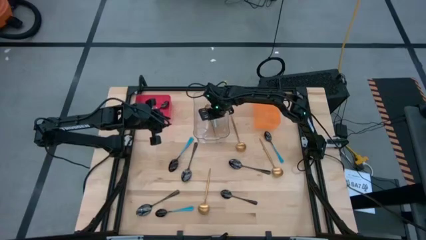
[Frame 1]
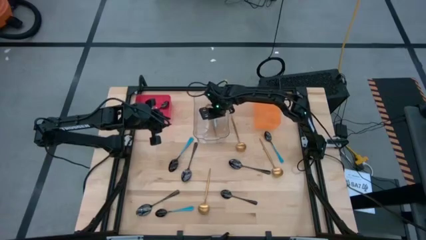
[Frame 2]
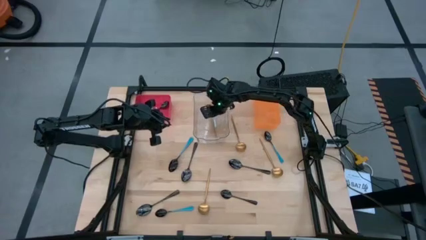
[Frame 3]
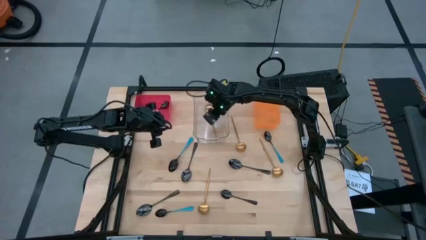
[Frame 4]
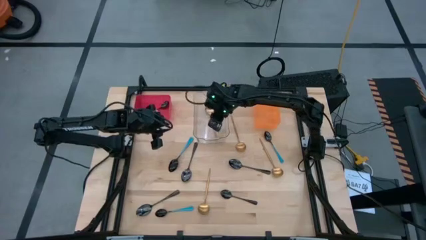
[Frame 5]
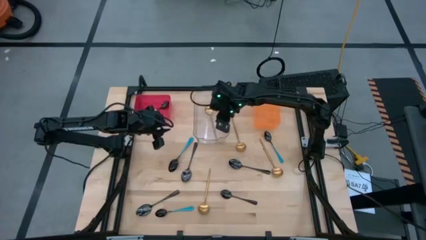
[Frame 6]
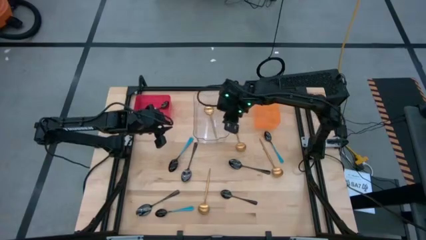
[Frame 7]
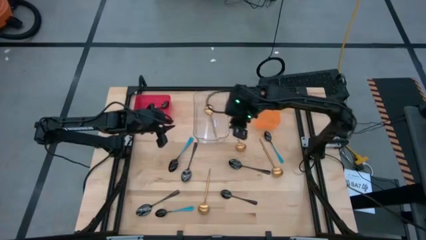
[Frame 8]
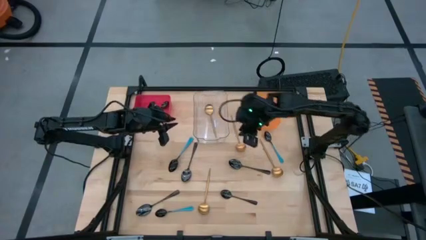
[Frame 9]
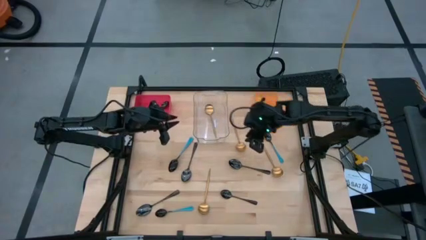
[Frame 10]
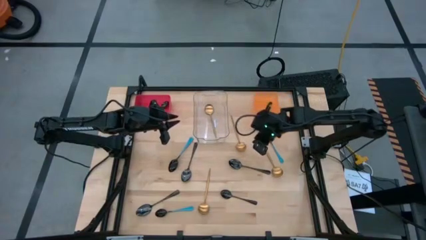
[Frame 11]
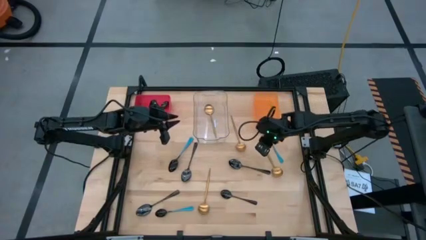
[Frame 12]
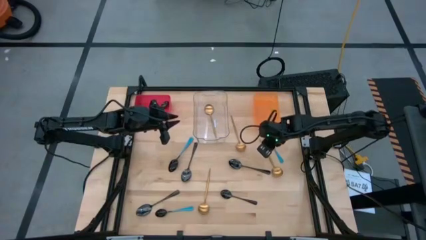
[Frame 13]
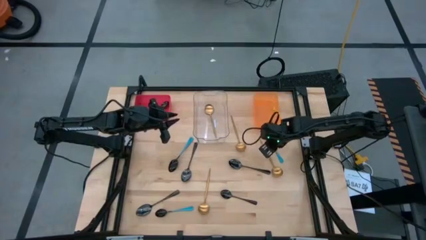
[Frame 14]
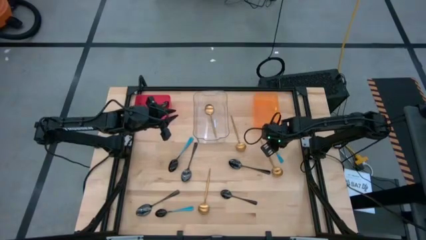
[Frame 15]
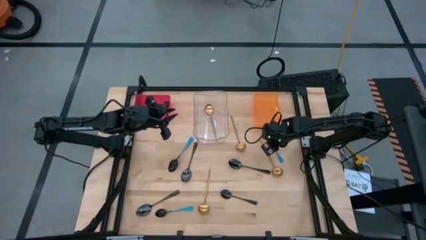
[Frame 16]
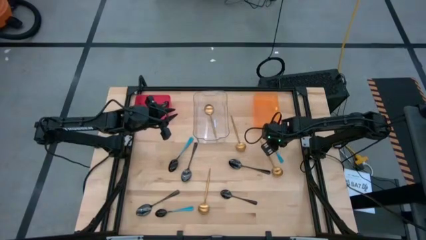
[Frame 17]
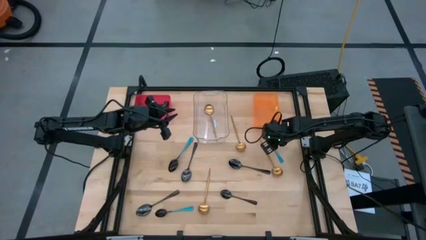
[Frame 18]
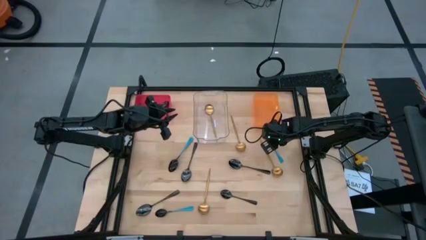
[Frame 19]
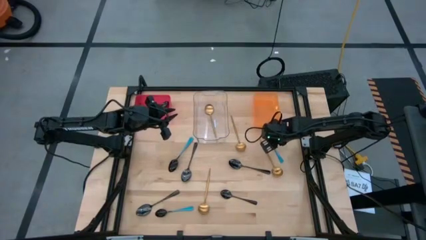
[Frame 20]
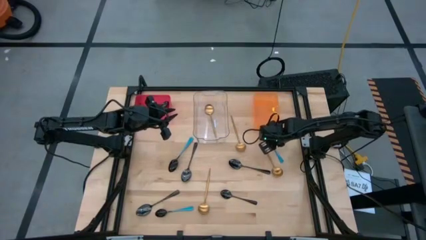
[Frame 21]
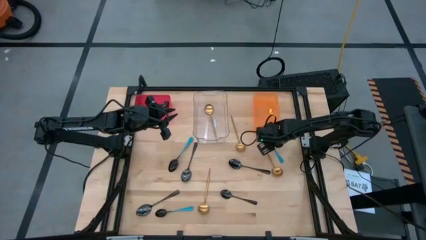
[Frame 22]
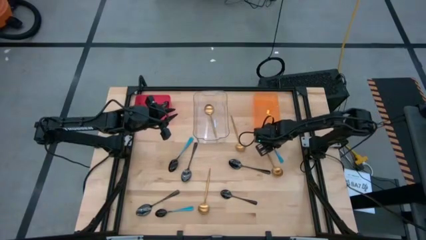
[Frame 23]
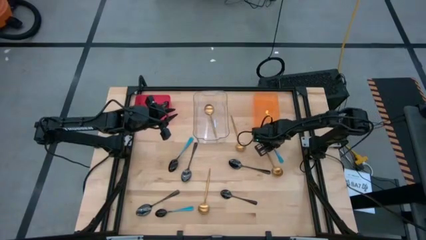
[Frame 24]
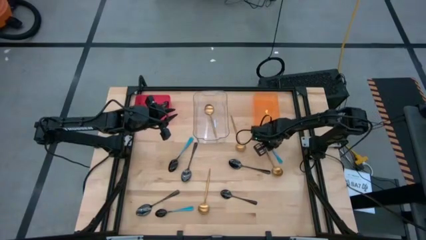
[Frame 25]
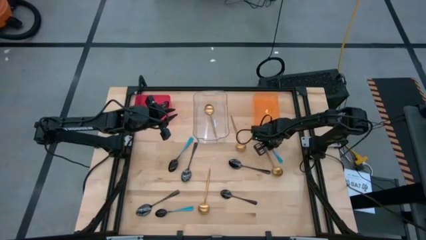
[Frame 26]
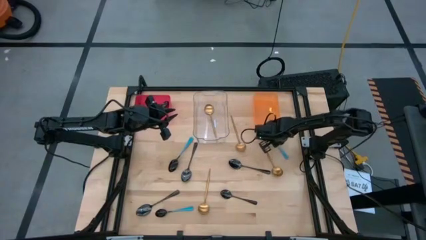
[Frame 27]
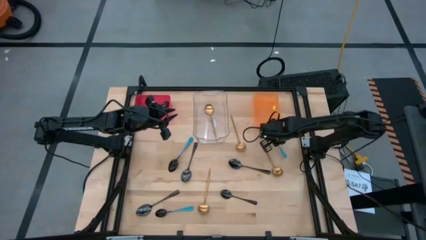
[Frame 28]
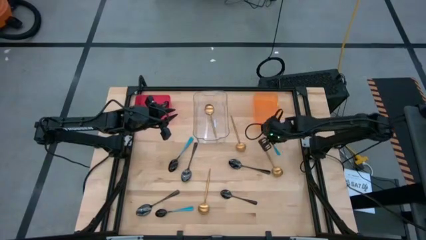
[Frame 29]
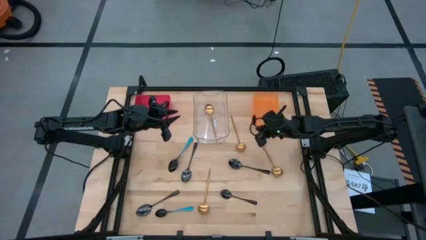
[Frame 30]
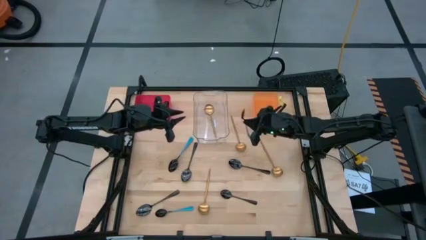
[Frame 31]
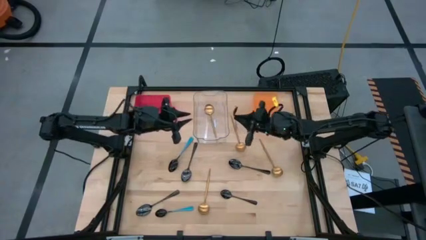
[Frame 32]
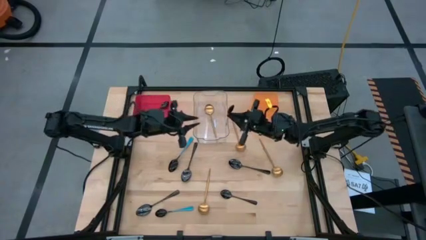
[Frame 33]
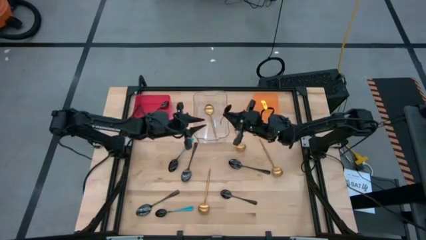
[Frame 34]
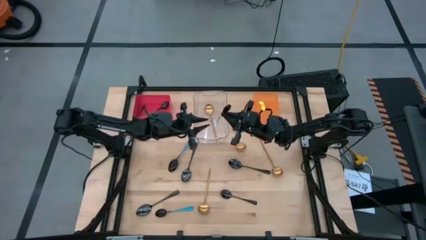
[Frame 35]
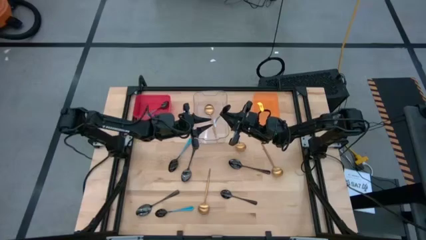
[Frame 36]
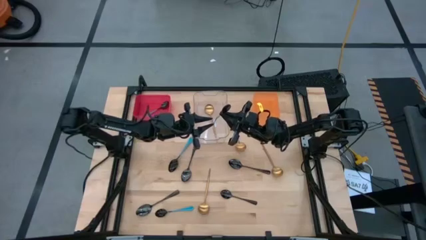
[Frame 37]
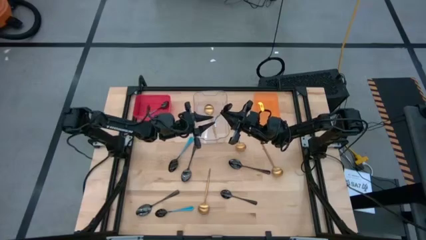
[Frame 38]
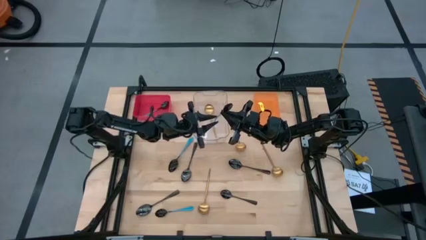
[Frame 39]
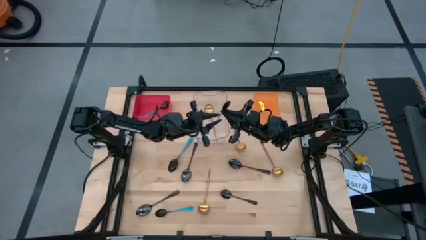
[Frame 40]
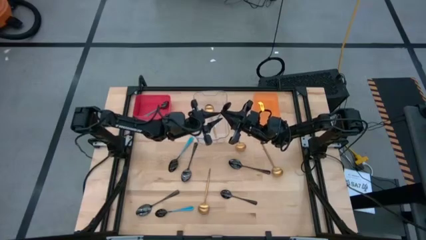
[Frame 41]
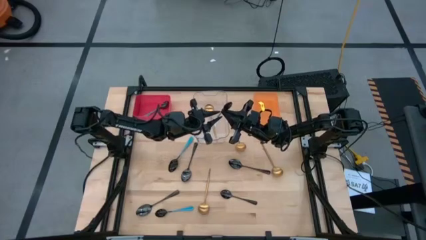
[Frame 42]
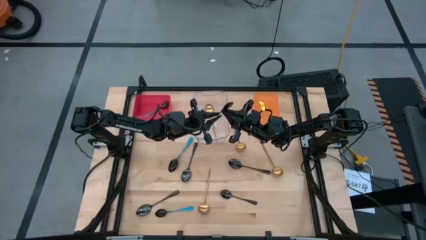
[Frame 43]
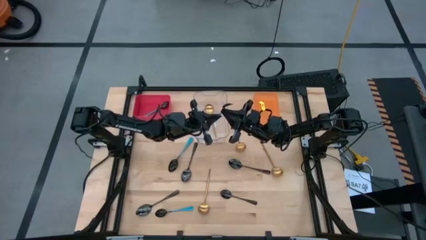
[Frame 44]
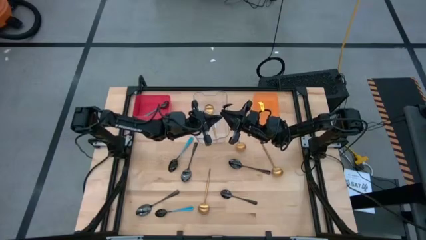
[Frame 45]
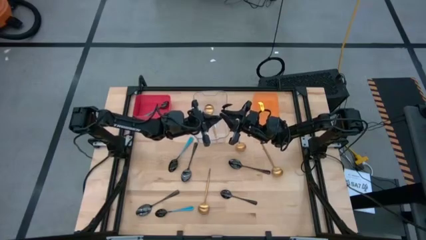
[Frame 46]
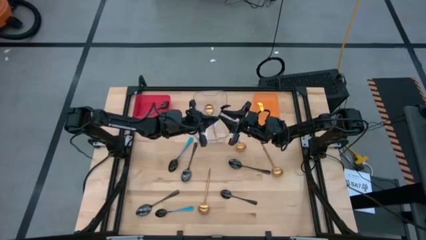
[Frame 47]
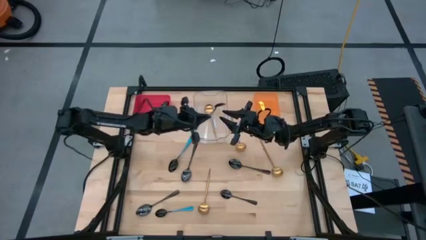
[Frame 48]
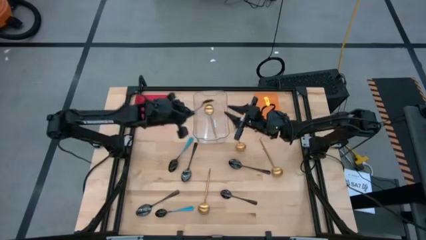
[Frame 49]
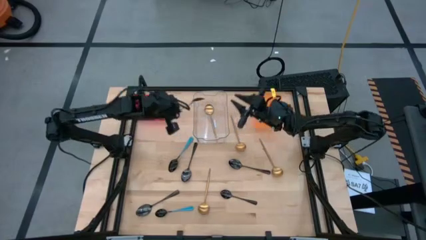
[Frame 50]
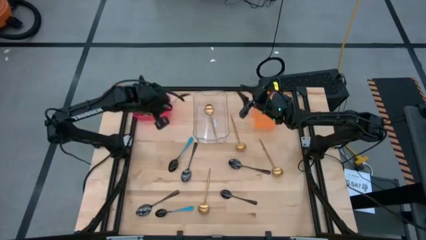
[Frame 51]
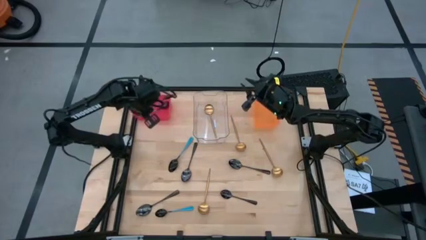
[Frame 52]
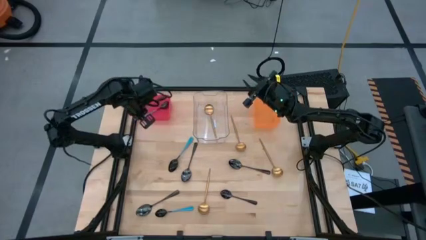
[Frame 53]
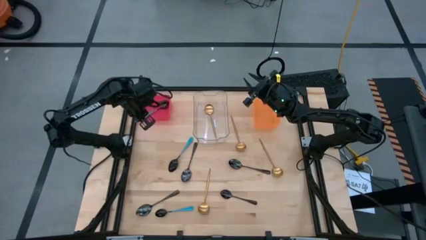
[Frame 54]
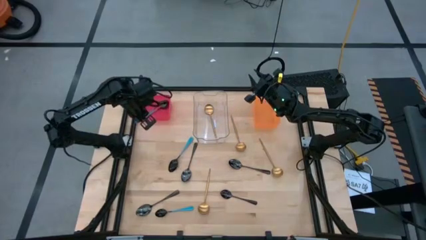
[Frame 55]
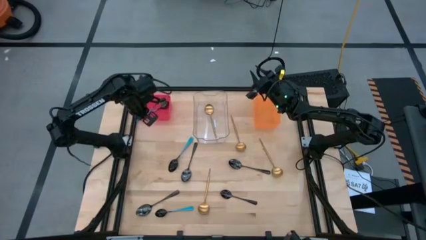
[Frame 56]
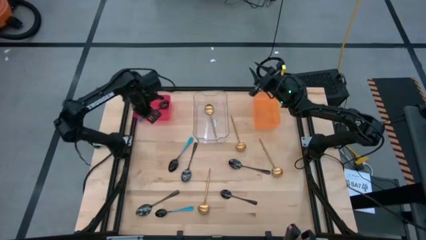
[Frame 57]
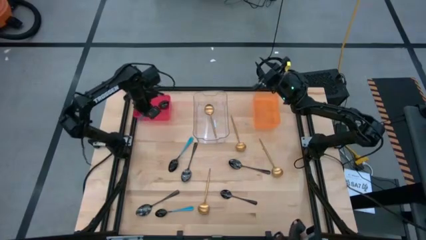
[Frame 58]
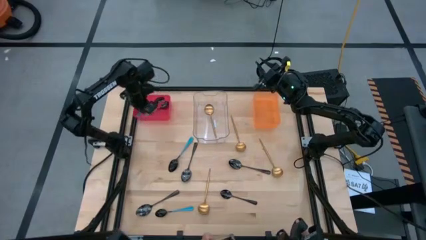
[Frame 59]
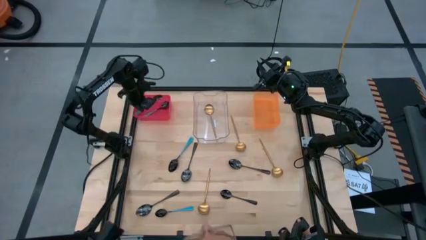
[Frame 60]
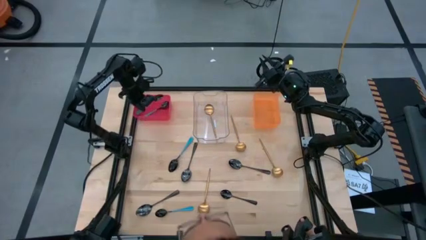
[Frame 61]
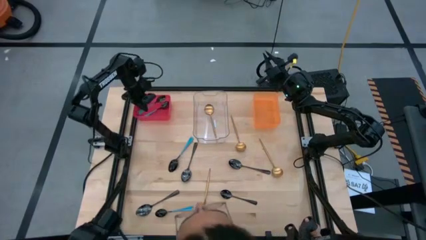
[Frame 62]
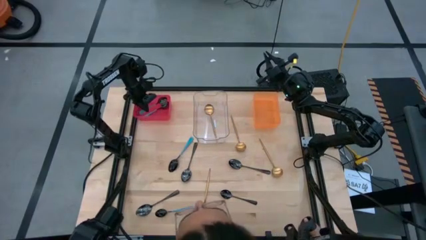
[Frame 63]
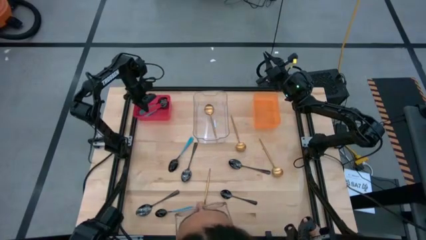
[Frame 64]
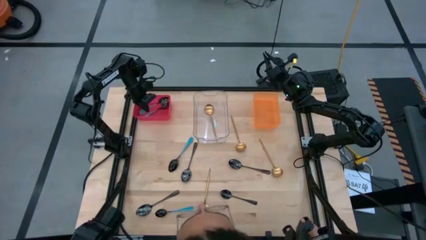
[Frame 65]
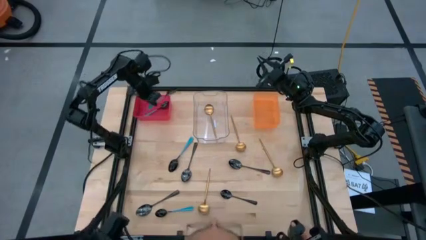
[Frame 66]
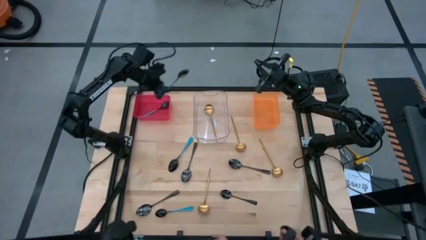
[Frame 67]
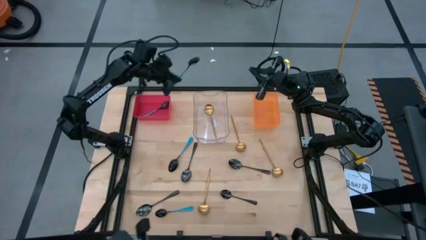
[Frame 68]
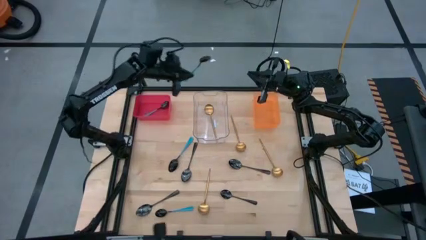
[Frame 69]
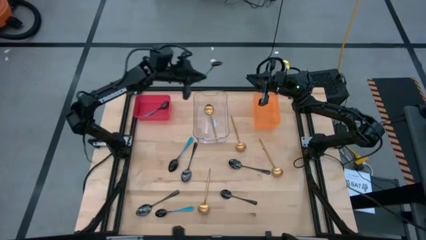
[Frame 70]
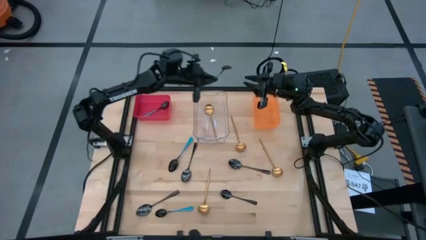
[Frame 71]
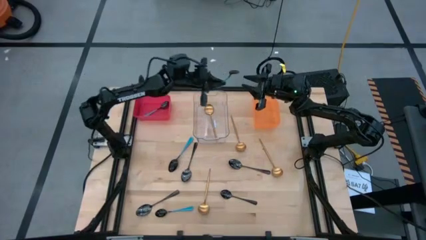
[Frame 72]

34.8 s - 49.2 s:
Task: Sort silverware by color (type)
Put the blue spoon into the red bin
